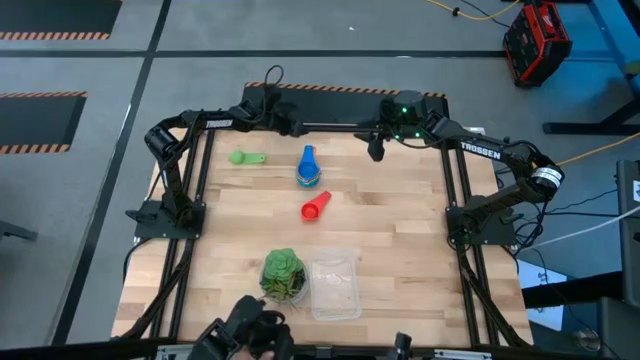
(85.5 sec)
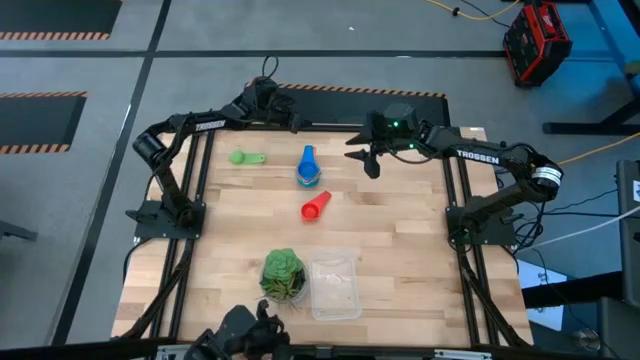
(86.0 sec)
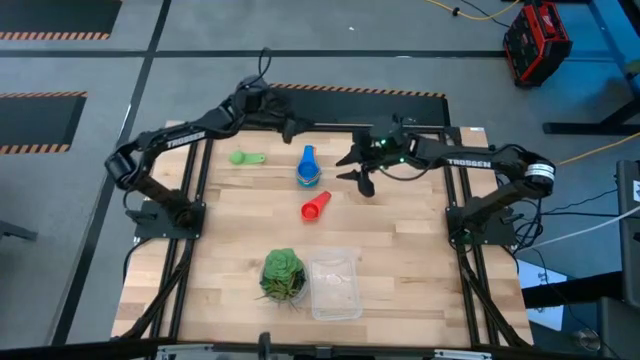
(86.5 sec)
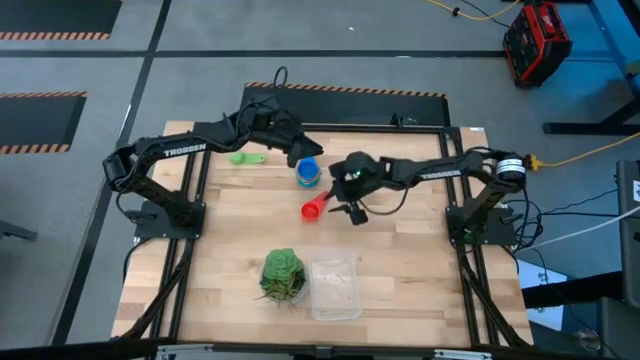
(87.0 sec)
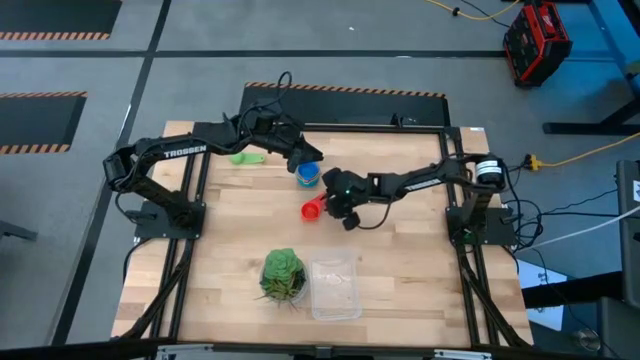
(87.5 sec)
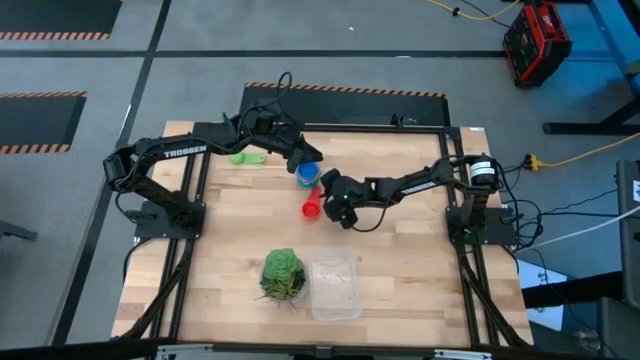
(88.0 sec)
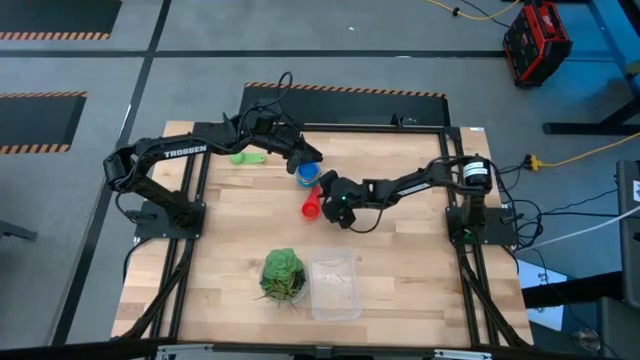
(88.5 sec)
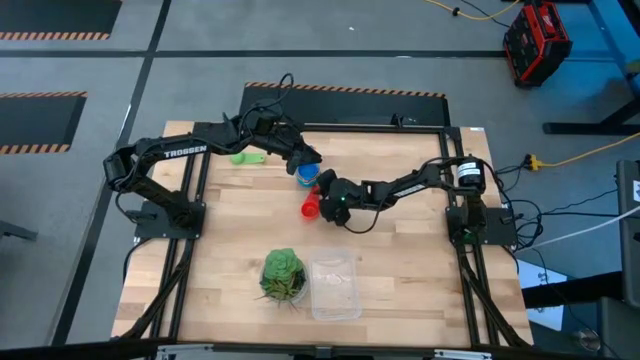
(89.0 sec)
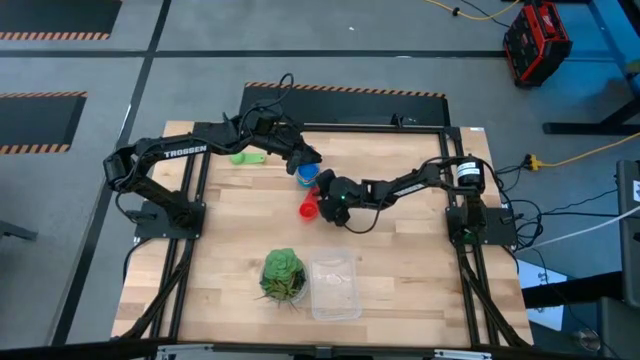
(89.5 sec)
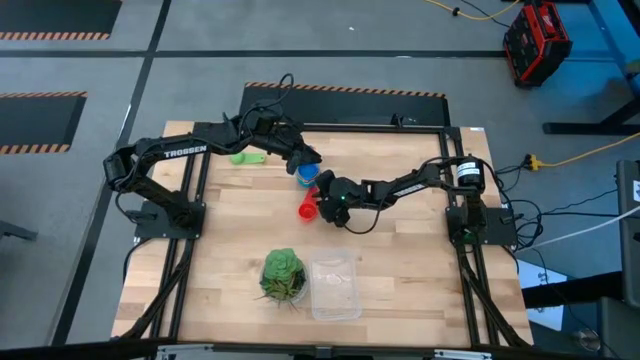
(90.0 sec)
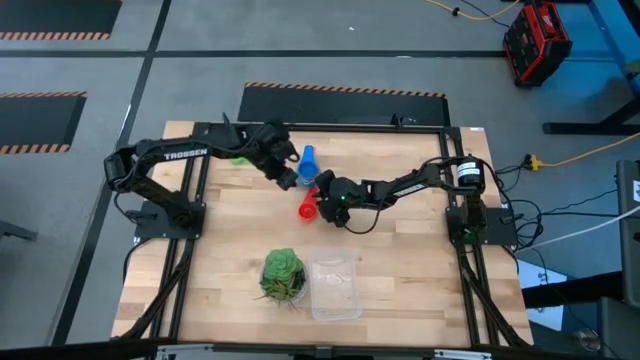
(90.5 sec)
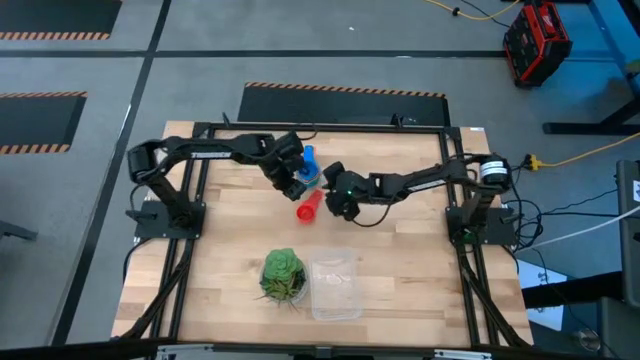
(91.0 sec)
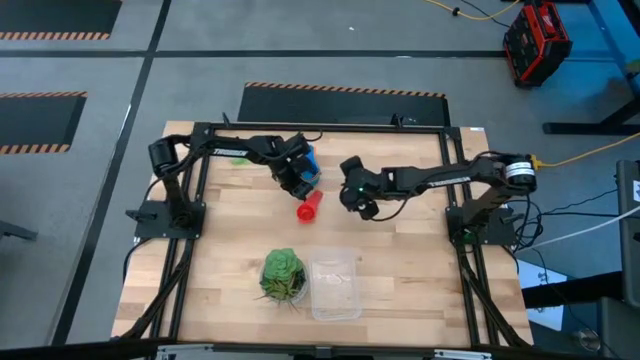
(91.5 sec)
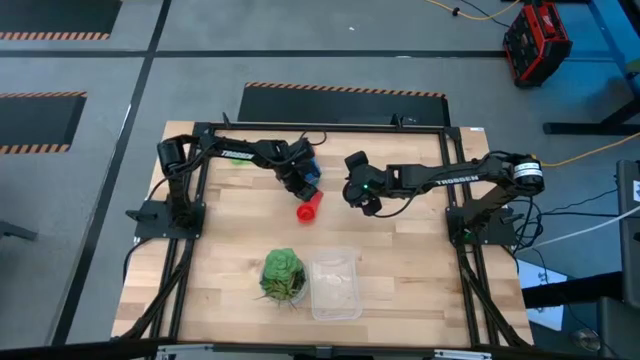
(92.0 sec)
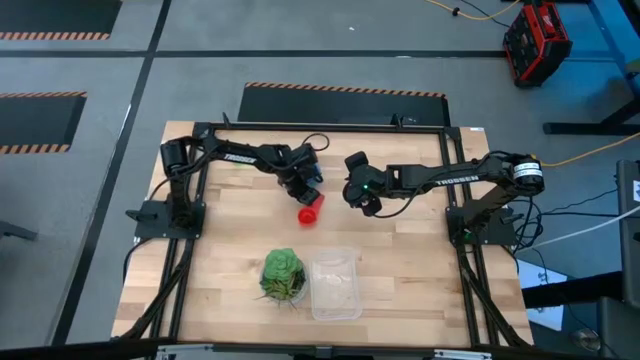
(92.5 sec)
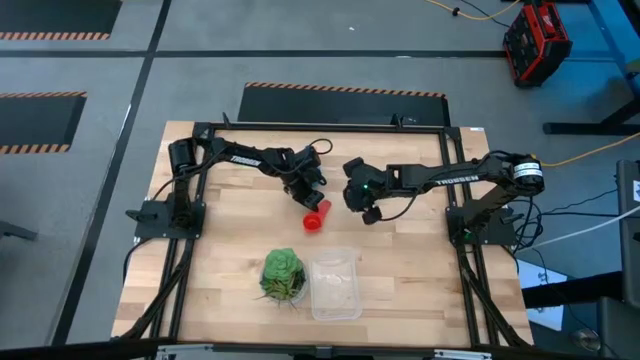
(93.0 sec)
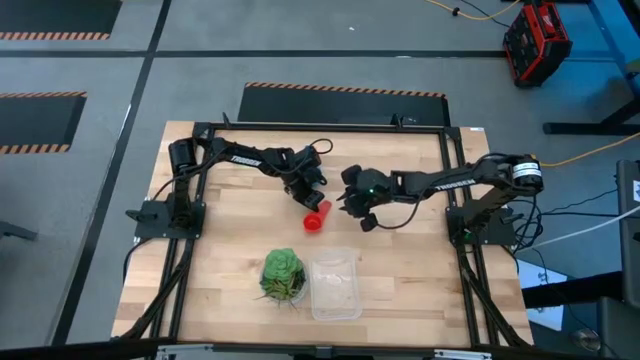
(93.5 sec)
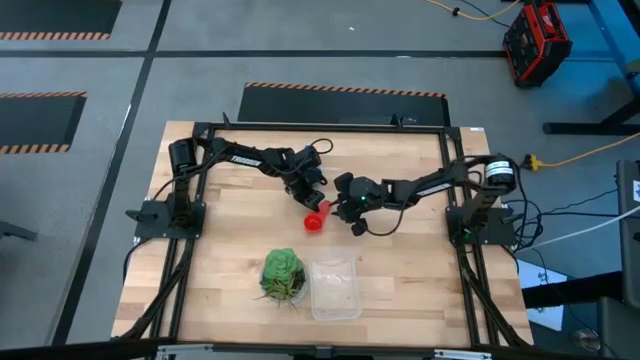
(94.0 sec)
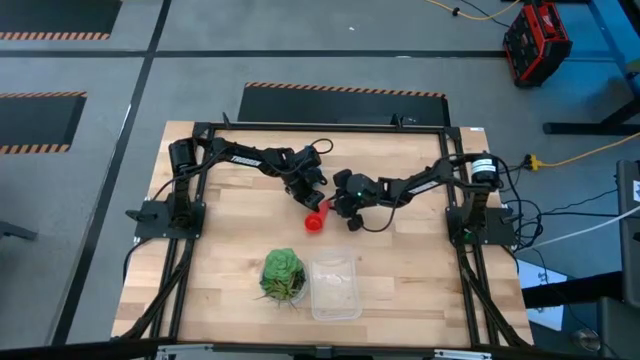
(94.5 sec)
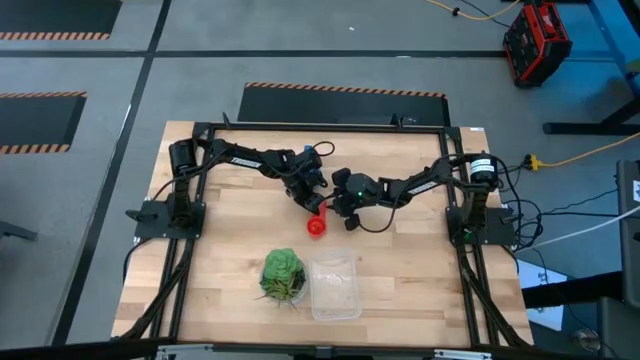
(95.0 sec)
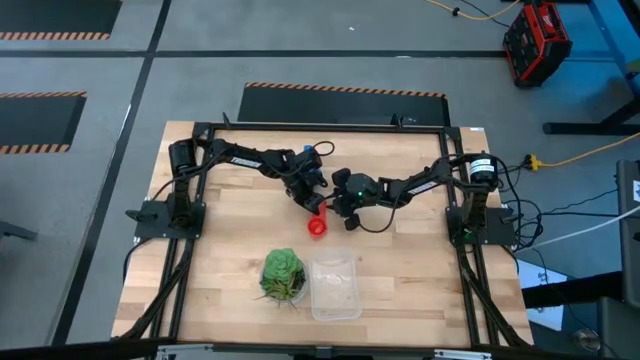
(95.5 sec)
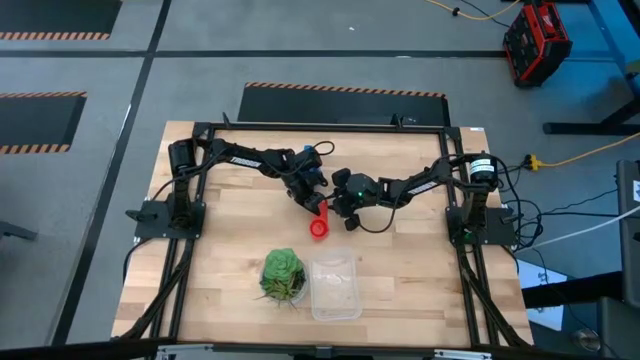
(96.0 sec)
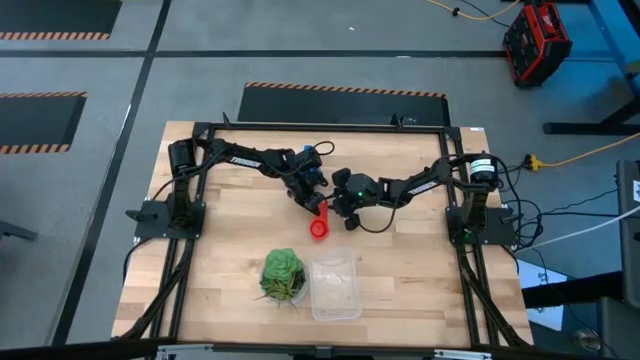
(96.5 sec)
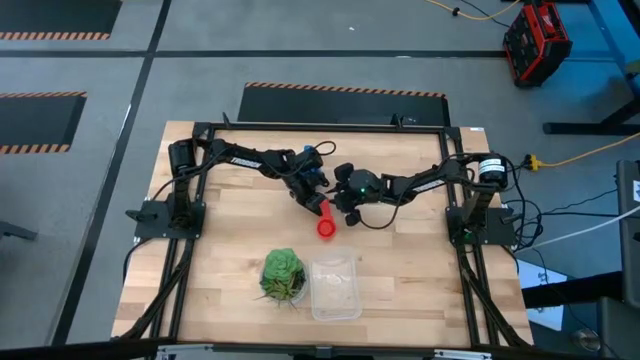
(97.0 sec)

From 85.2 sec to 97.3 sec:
Task: Nest measuring cups in basket
Stack the red measuring cup on top of the blue measuring cup
